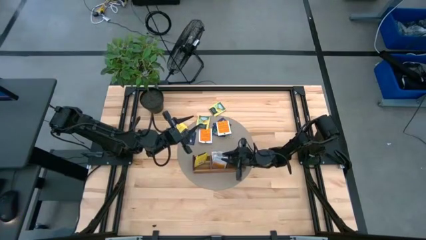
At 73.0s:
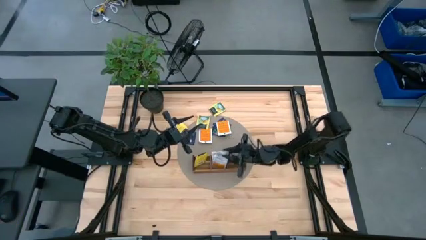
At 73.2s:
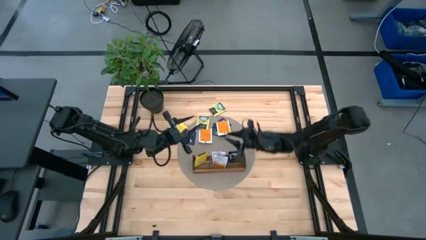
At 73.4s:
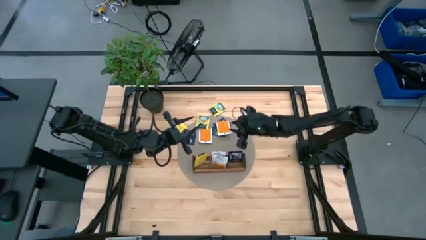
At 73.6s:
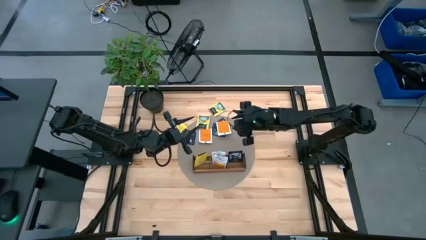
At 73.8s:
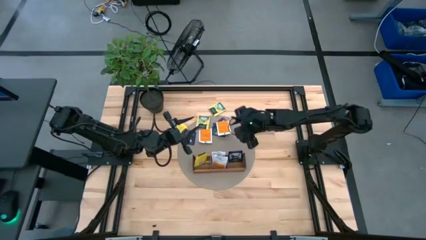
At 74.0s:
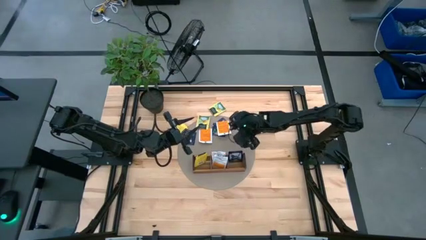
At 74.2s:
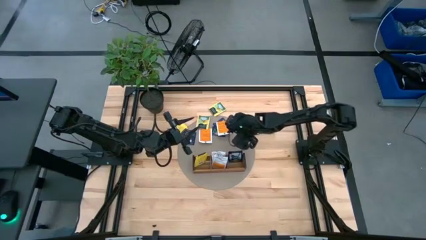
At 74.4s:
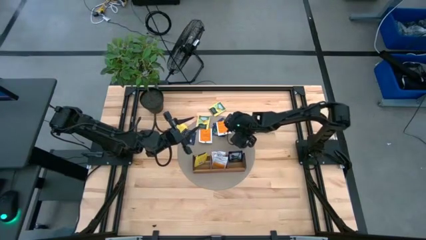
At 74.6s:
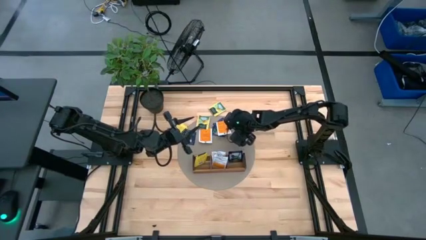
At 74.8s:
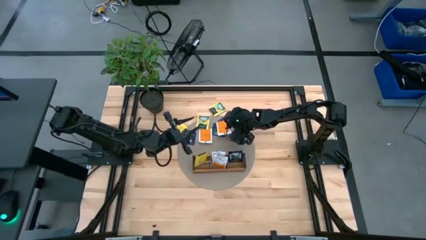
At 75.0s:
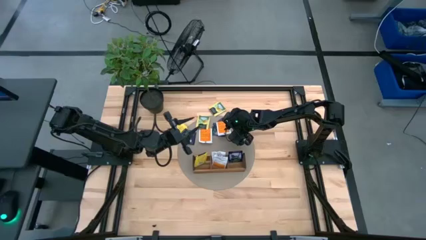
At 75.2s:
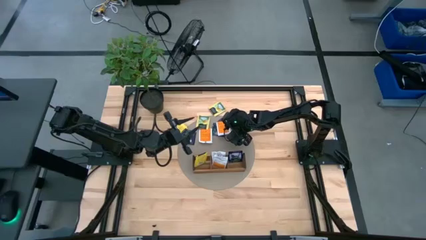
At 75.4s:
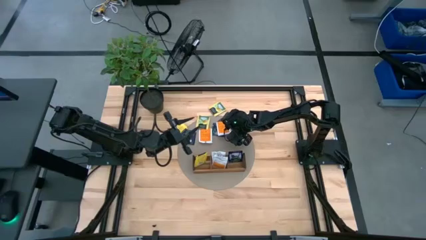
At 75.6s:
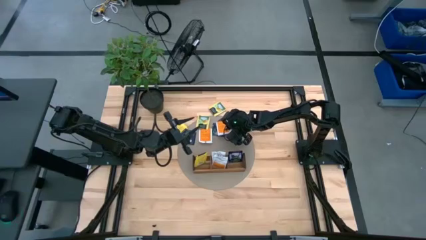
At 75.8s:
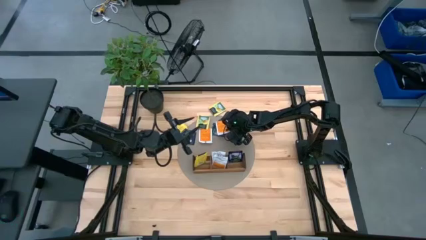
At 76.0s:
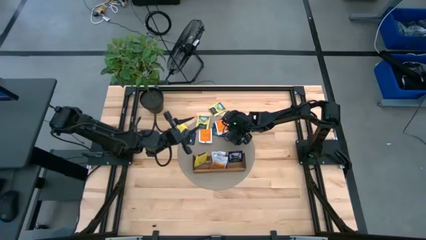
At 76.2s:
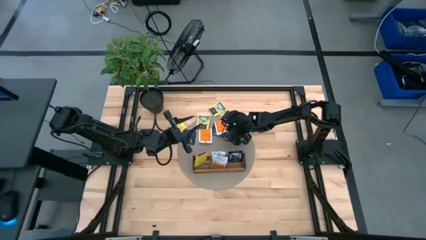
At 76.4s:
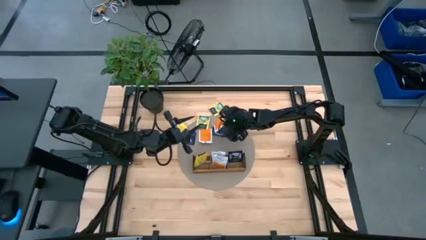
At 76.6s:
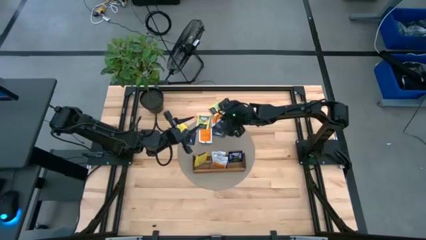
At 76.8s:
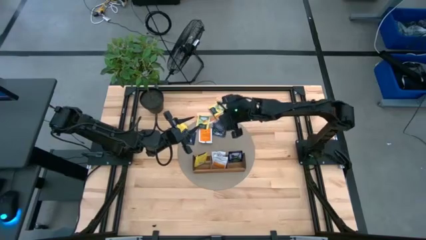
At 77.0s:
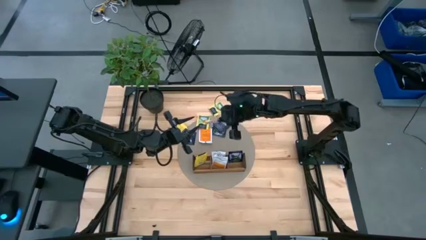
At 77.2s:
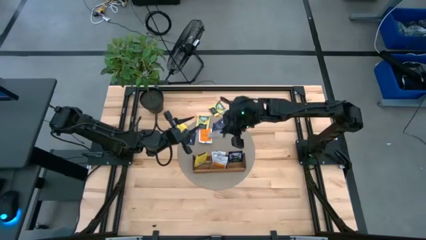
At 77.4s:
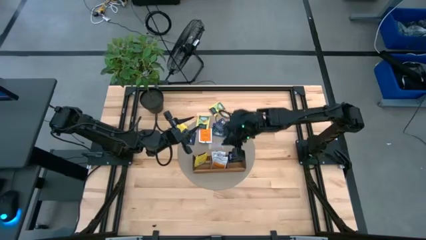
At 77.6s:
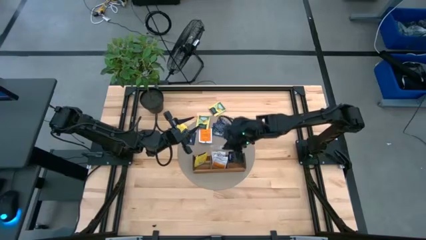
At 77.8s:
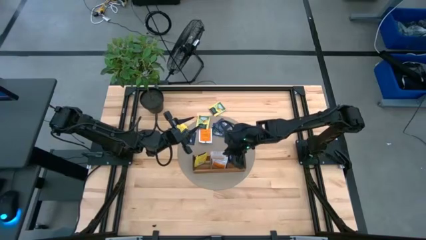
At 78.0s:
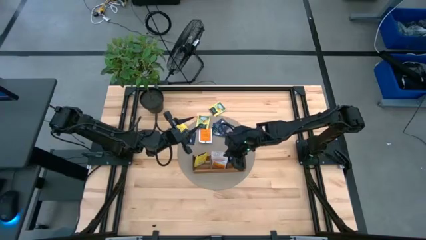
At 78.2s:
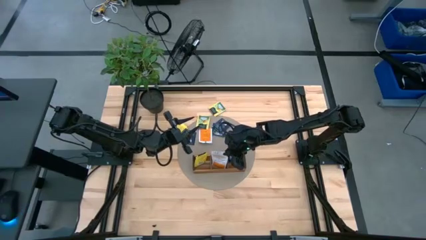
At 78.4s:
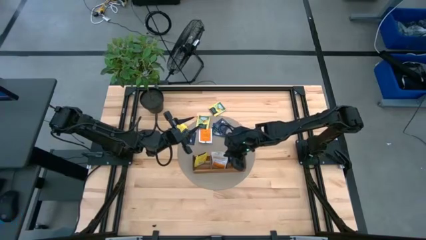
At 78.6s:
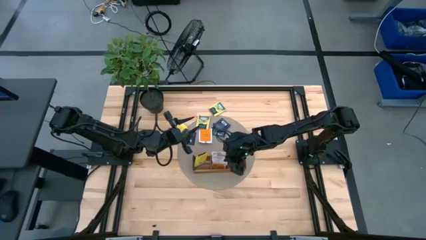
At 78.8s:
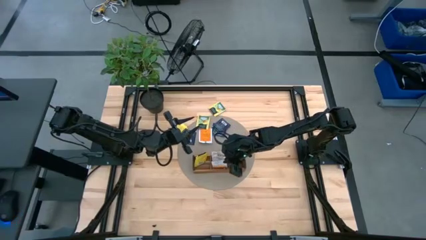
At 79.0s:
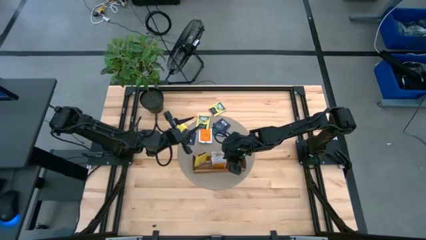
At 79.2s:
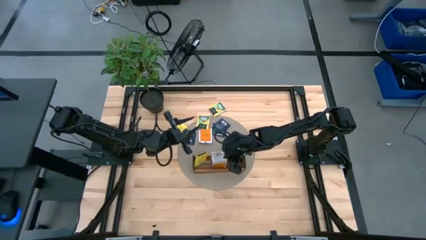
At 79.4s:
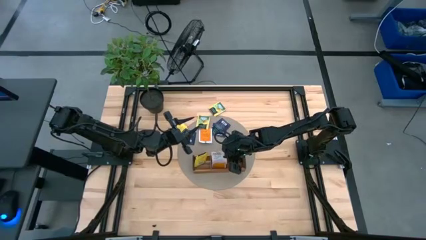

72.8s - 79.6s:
Task: Pick & Place Tea
Put the orange tea bag into the middle section of the wooden organizer

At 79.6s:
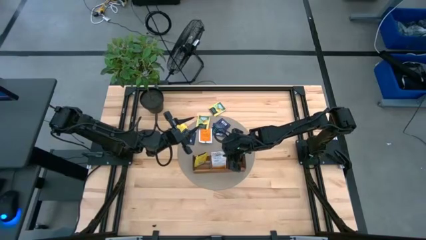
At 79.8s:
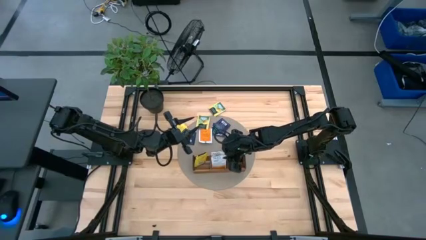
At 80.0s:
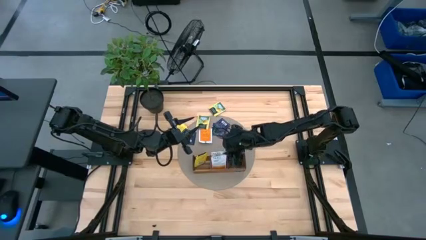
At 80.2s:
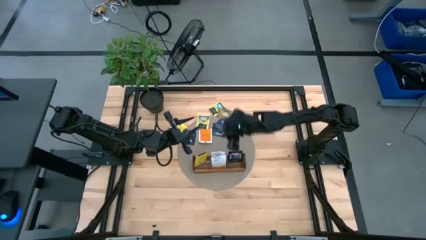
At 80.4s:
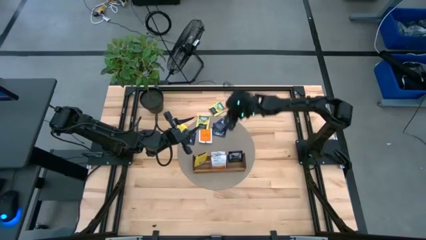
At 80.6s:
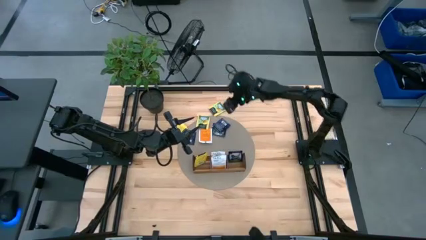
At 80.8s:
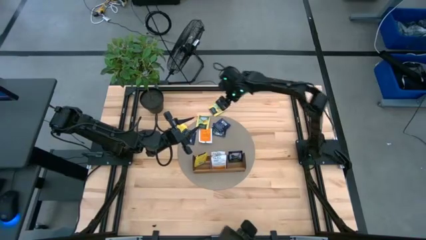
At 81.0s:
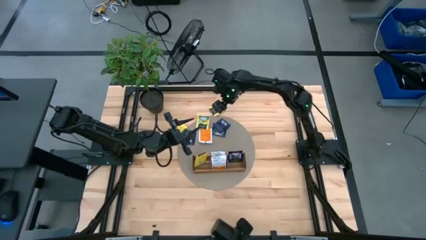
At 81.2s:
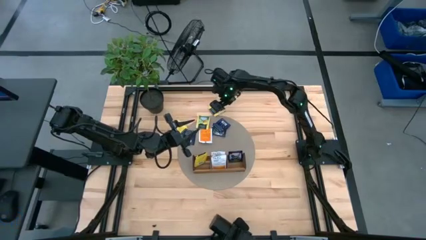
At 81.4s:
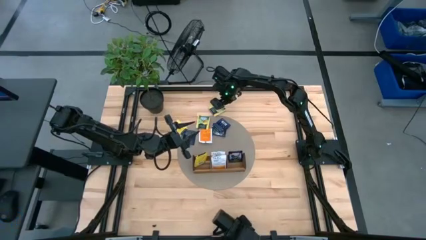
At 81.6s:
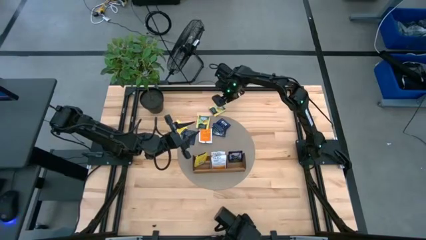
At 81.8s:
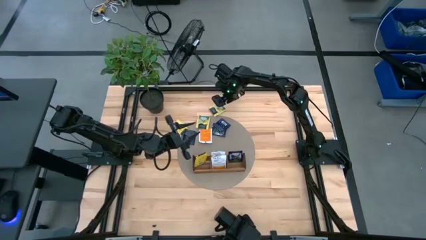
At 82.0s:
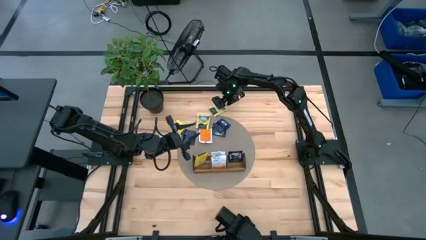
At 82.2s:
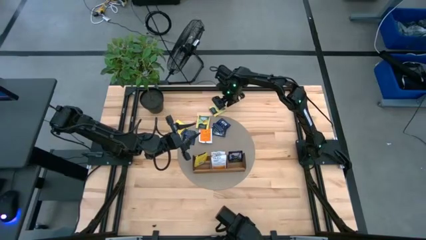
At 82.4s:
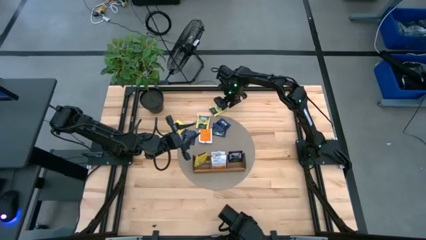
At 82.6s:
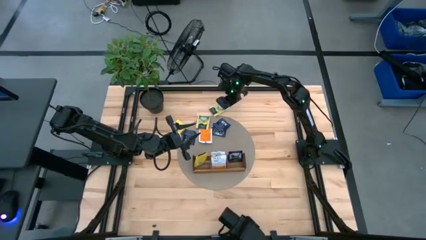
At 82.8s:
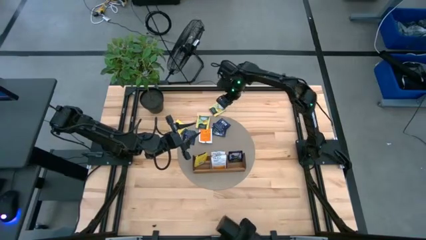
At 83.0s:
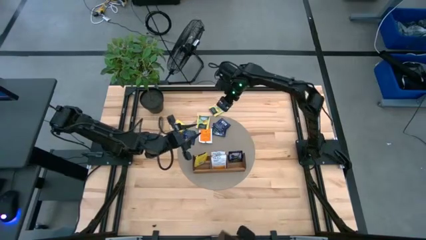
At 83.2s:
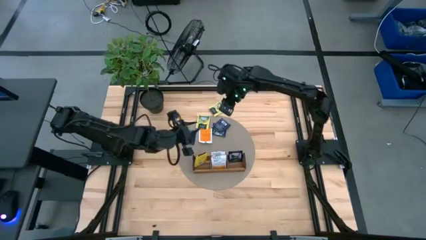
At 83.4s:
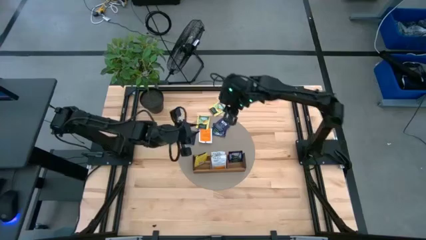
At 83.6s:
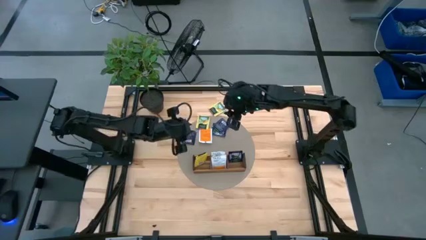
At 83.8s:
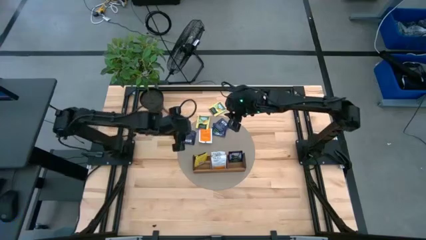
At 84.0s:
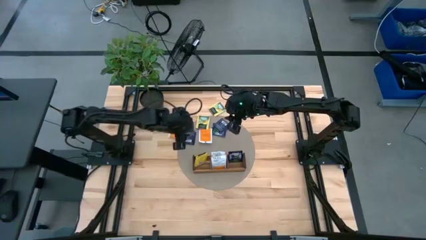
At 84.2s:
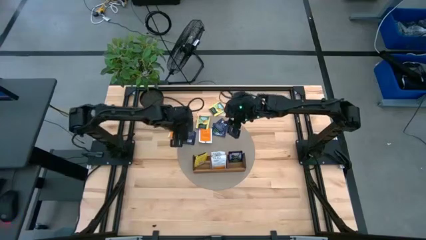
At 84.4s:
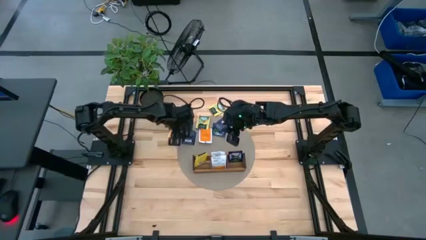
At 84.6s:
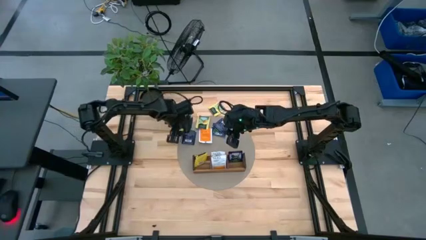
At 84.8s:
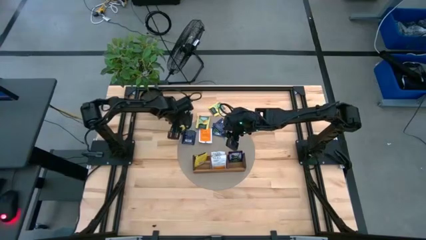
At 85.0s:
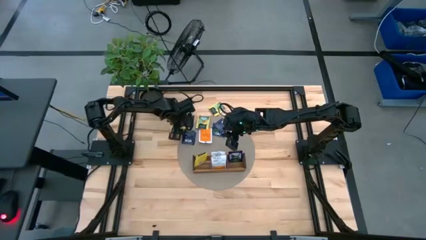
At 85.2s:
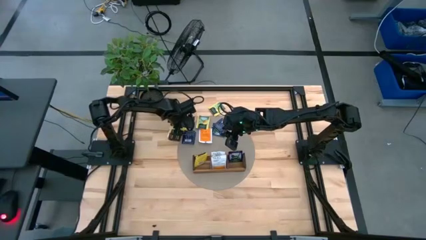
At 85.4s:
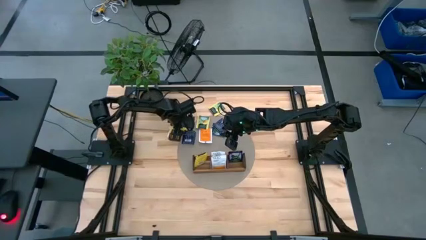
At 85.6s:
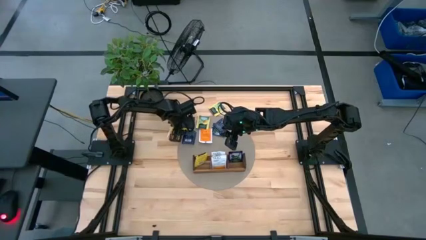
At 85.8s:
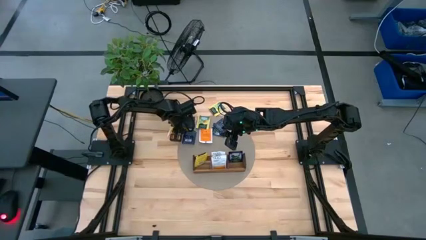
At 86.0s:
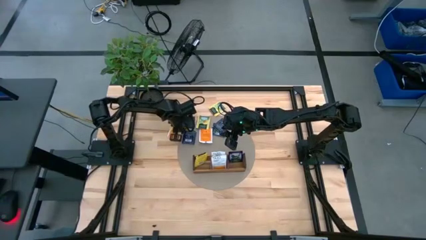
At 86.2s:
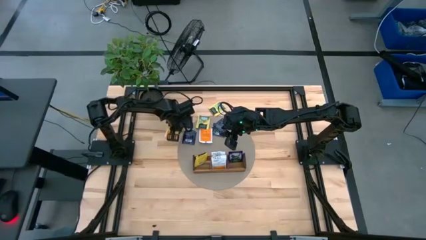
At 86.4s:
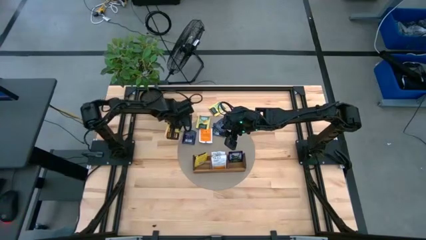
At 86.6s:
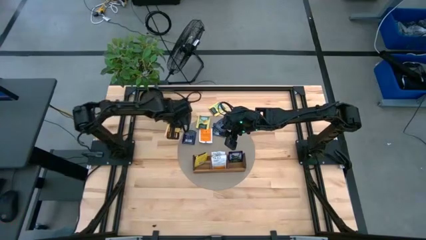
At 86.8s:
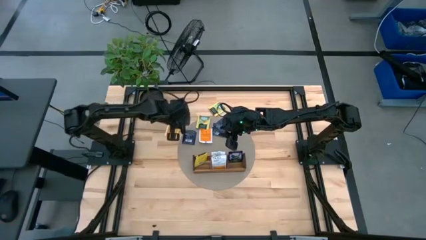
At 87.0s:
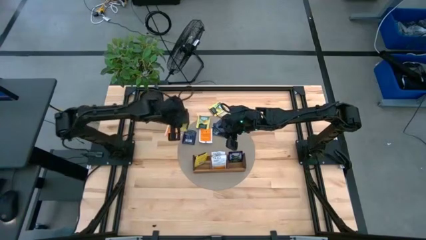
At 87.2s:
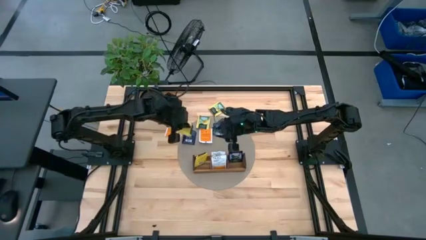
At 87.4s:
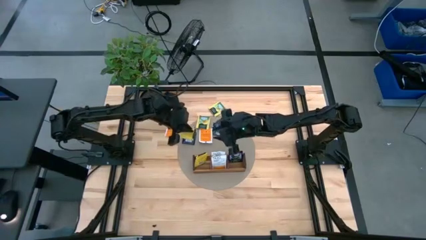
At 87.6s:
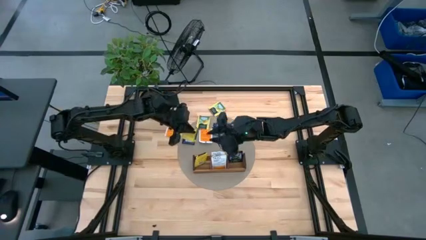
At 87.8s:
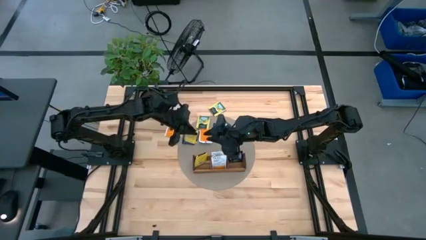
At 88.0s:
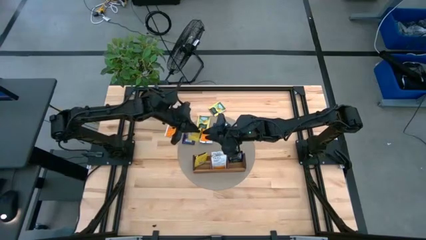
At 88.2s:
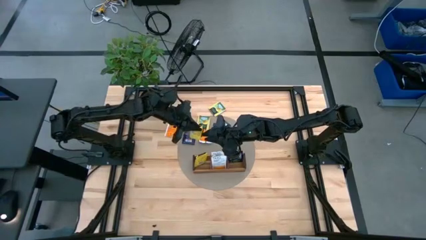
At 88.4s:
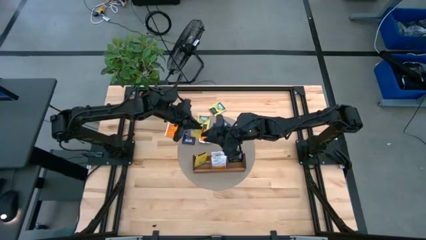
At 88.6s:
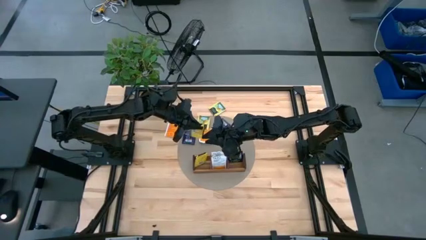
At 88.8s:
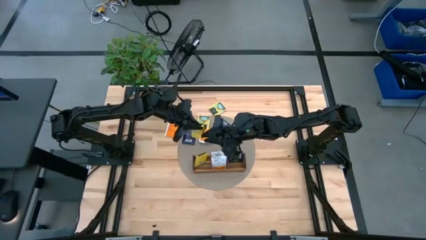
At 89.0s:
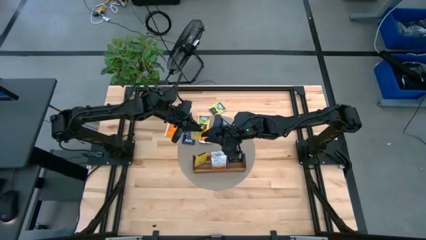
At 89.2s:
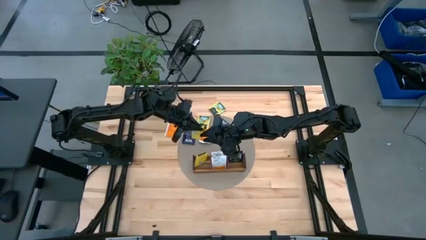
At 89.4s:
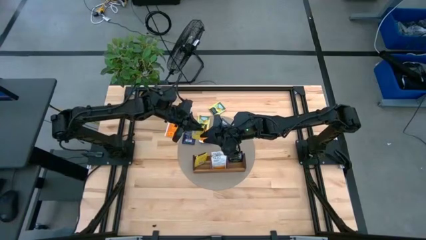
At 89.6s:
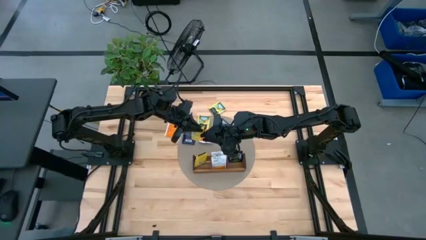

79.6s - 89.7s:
Put the yellow tea bag into the left section of the wooden organizer
